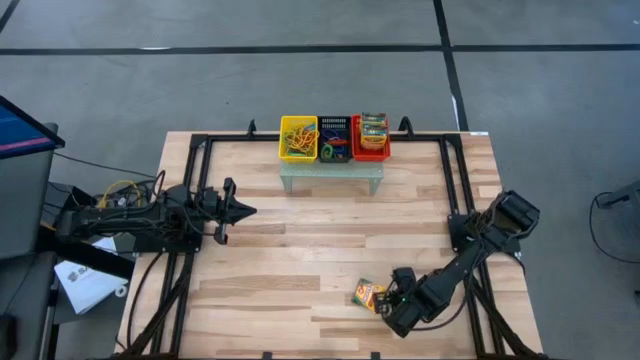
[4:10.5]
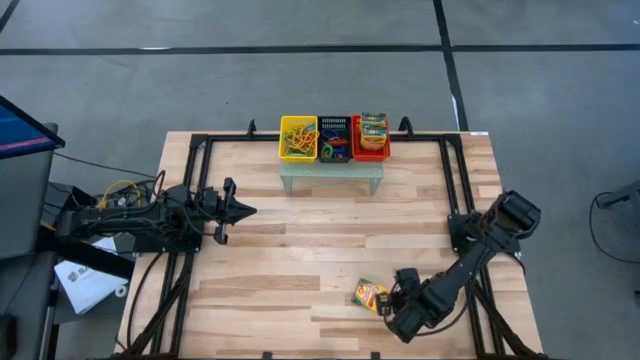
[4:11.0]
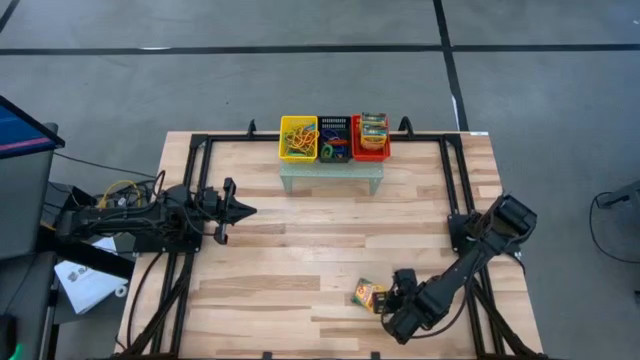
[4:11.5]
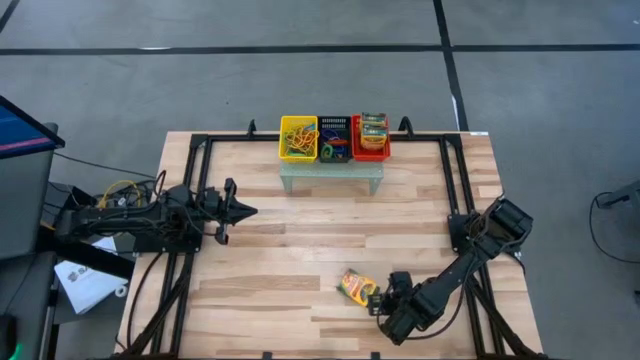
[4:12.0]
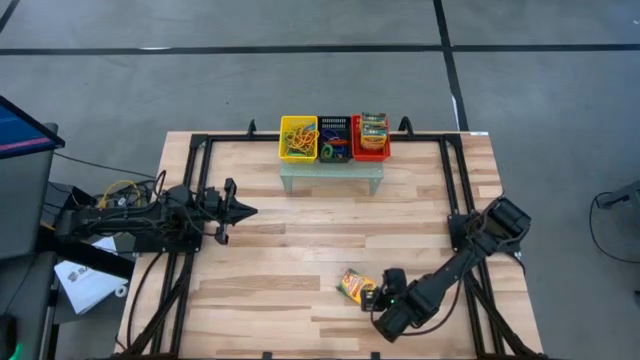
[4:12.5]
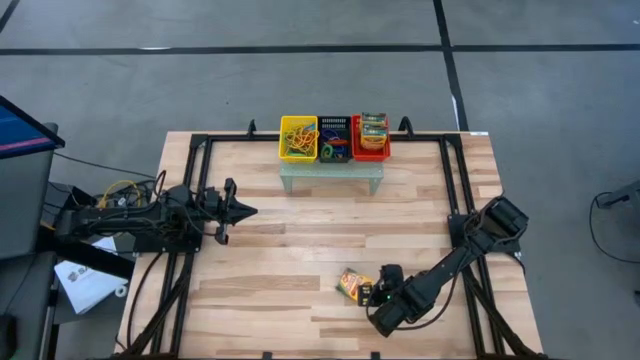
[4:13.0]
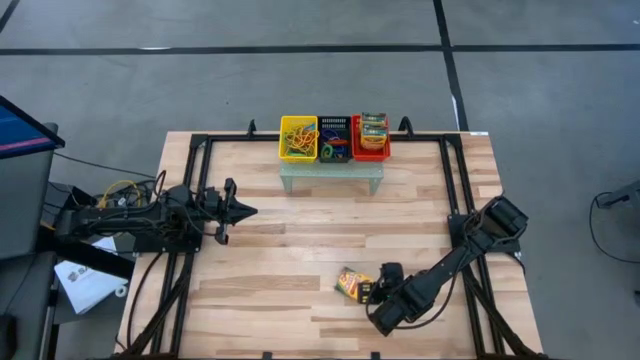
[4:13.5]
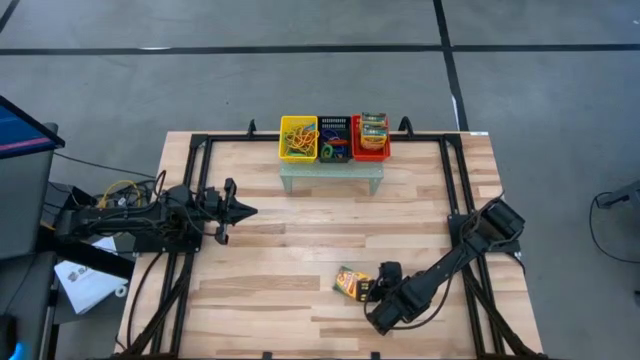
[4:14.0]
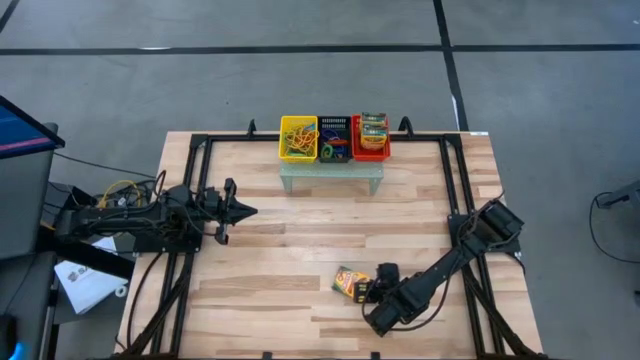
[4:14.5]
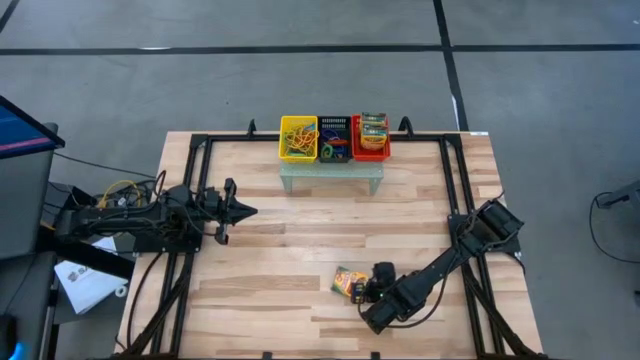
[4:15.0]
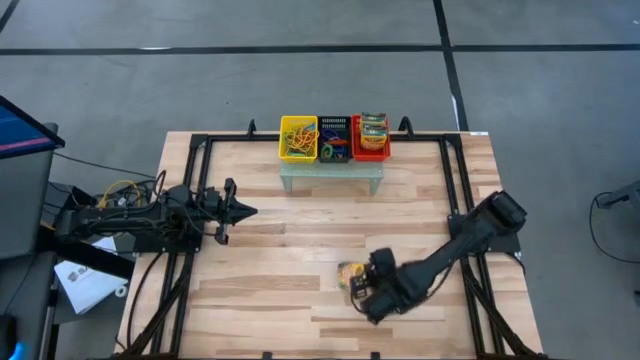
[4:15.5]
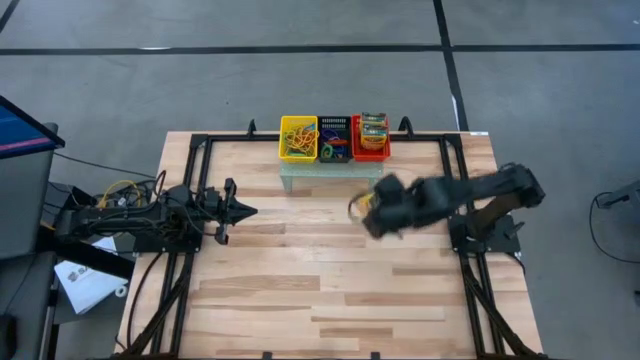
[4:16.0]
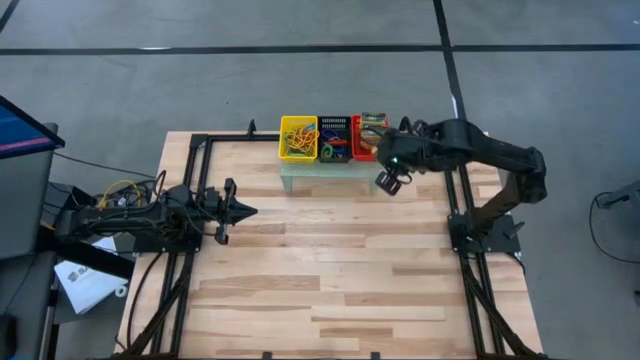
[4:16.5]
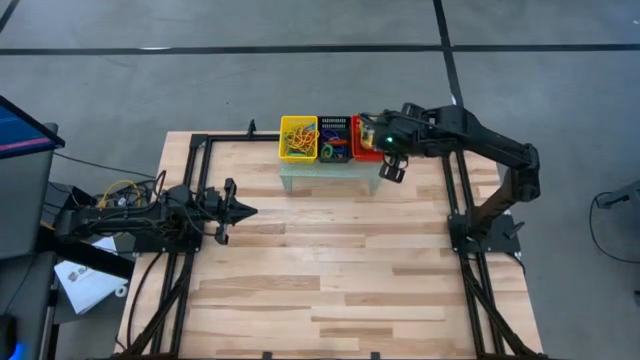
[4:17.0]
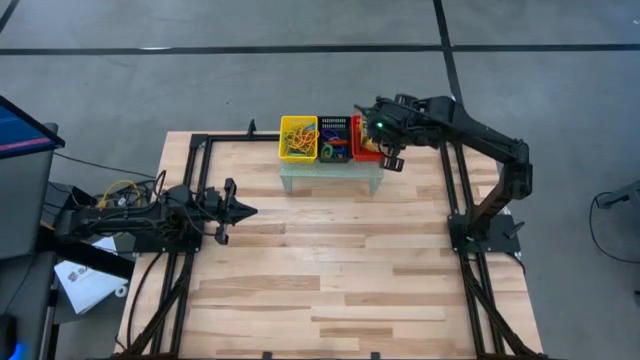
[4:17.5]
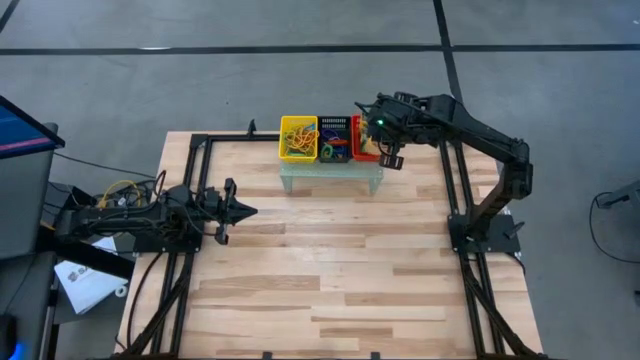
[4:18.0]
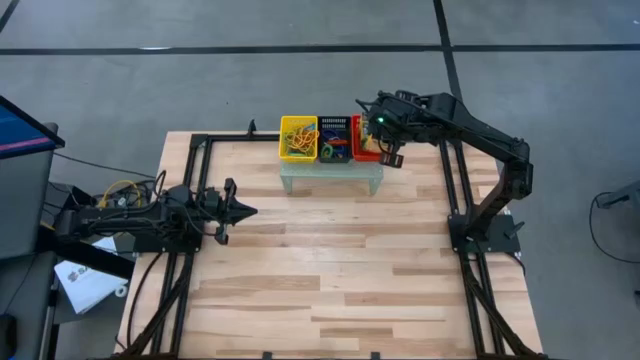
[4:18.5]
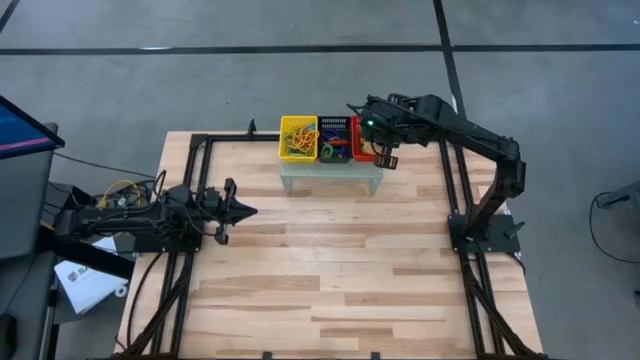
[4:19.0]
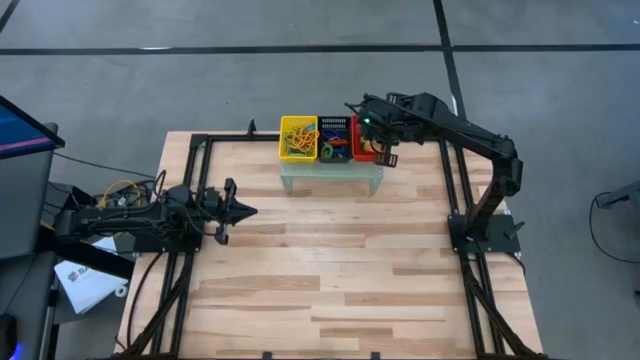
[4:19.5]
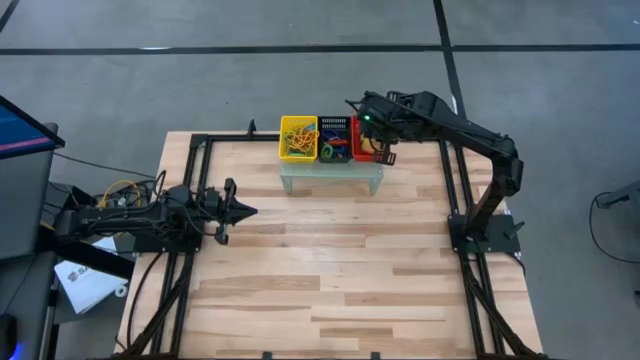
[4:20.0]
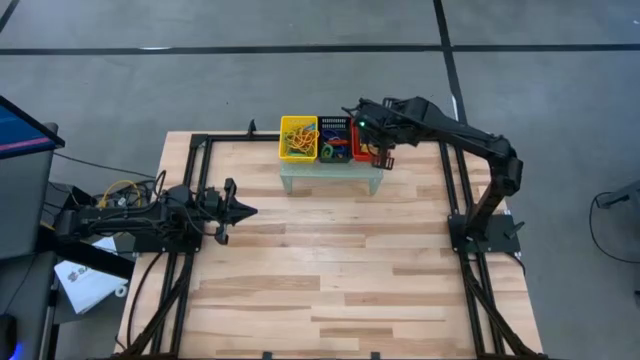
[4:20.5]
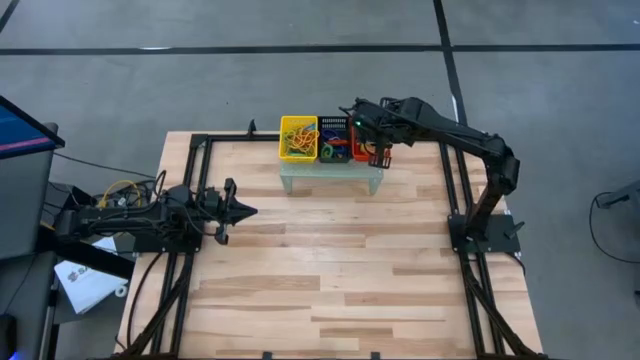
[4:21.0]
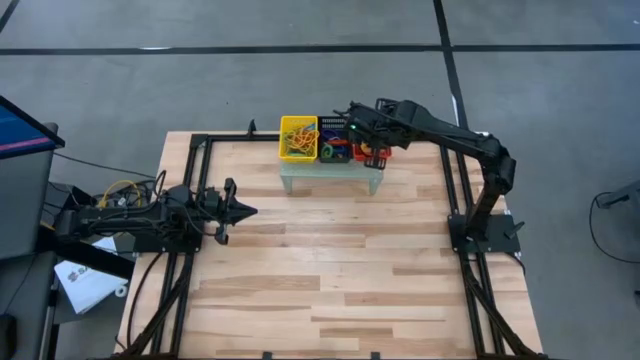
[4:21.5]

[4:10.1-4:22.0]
Task: Pick & Place Office Desk Supplies
Put the yellow crayon box into the red bin on the shelf

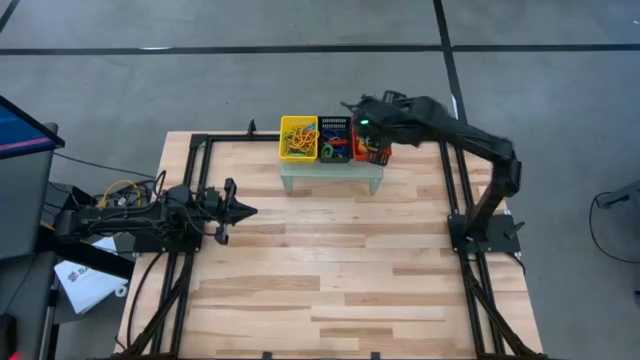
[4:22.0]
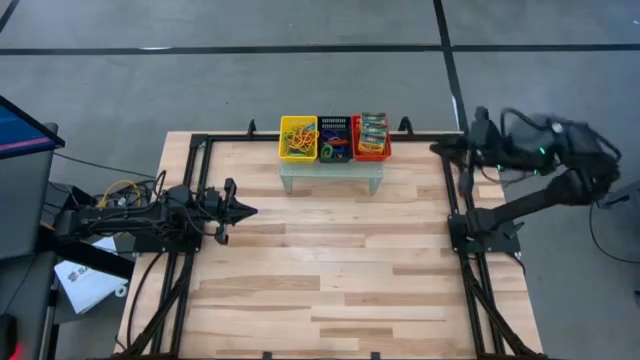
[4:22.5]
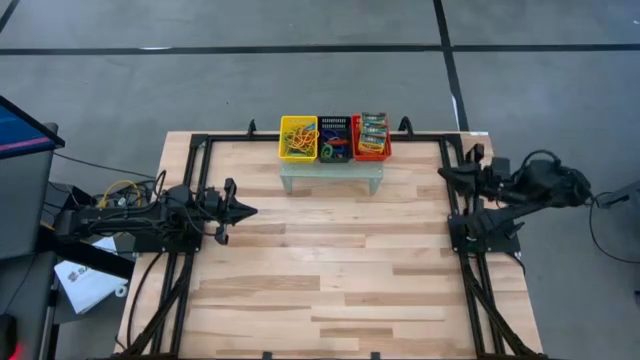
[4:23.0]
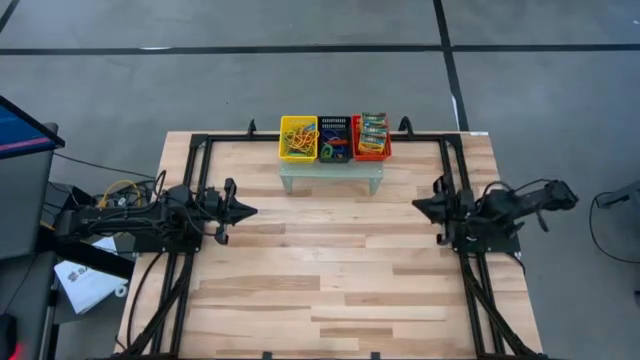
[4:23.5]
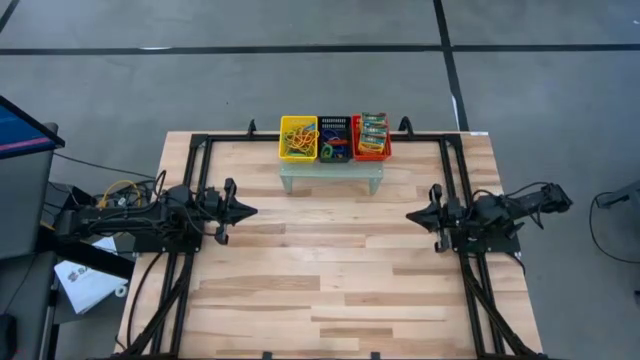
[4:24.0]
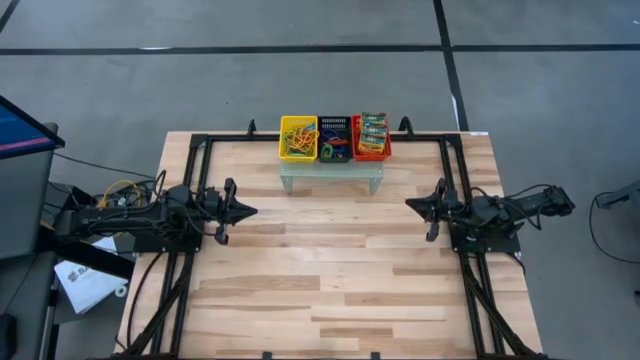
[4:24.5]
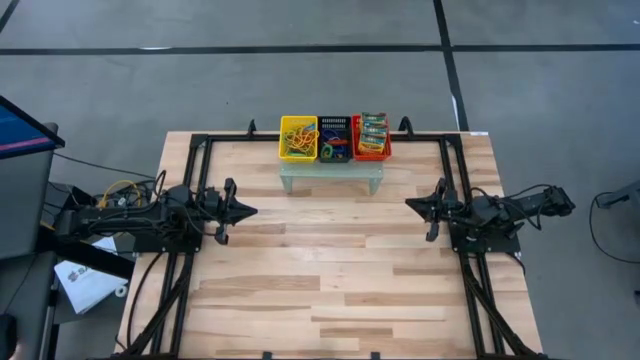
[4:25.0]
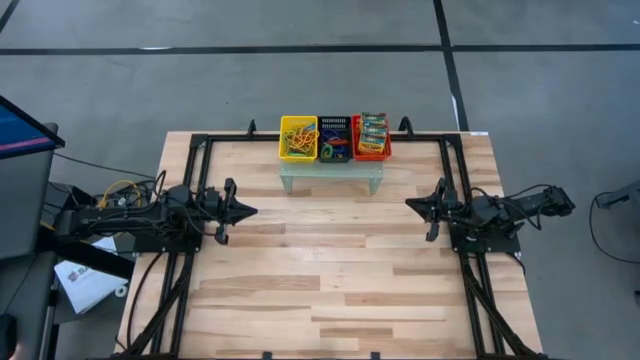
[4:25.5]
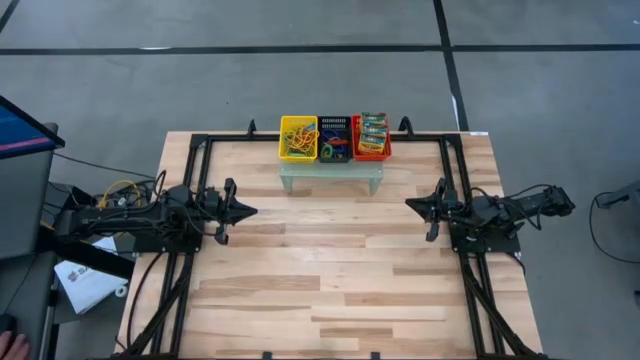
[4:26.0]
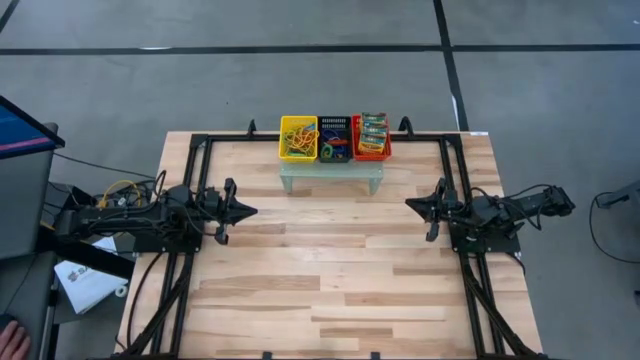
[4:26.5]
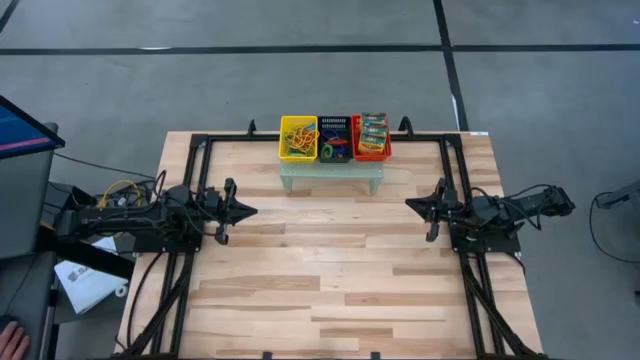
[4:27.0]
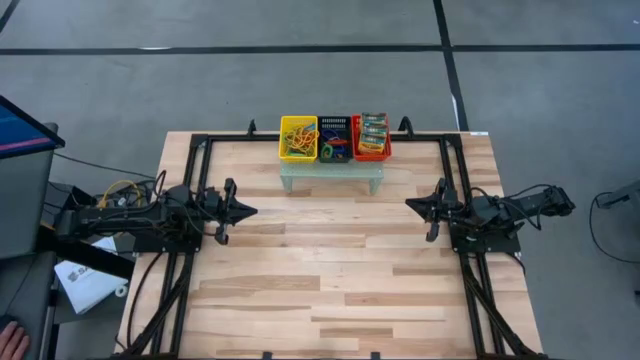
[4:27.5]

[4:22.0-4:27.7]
Return to Home Position

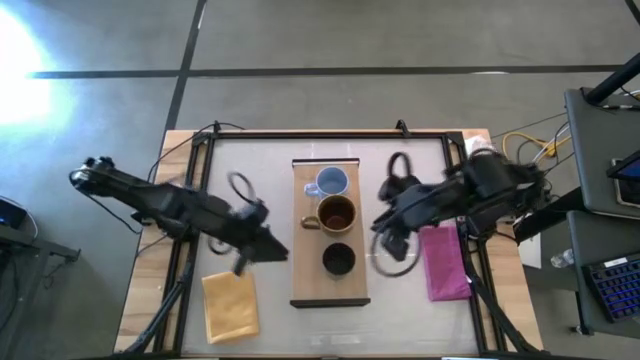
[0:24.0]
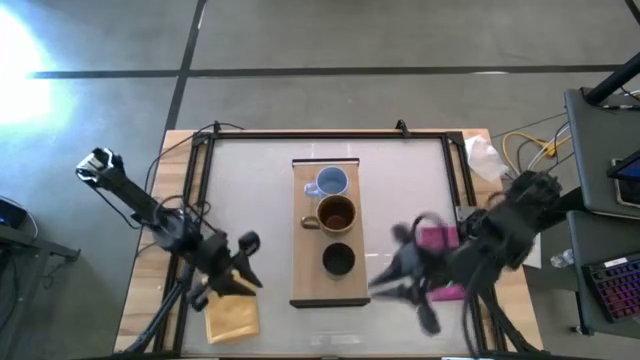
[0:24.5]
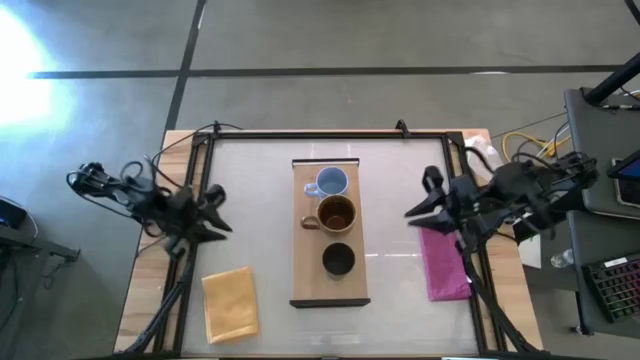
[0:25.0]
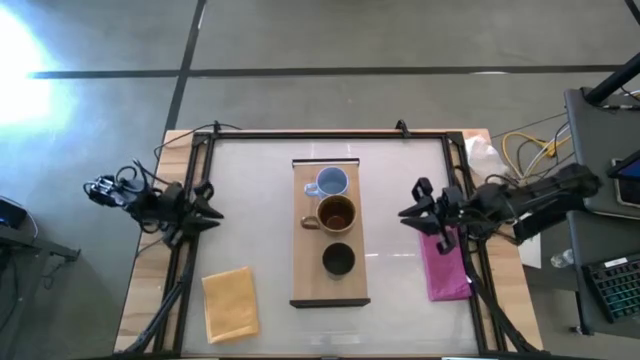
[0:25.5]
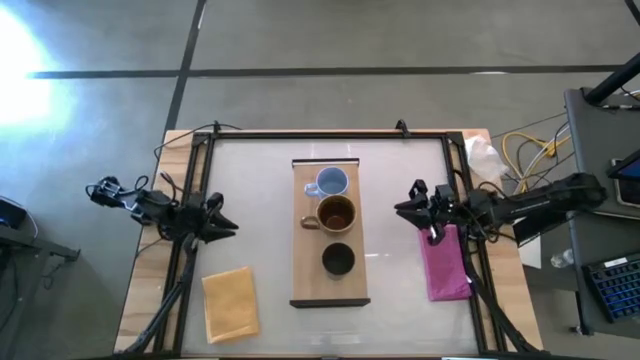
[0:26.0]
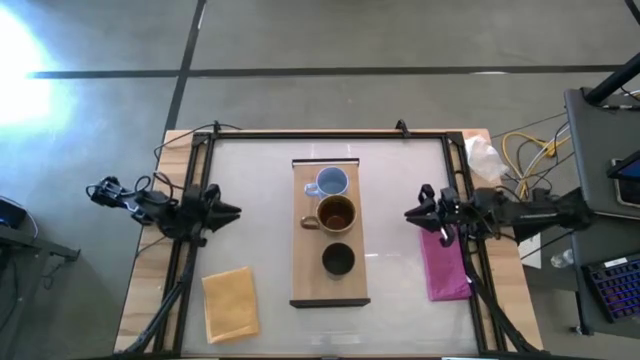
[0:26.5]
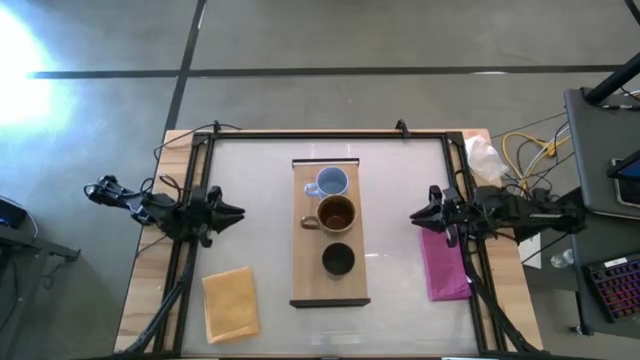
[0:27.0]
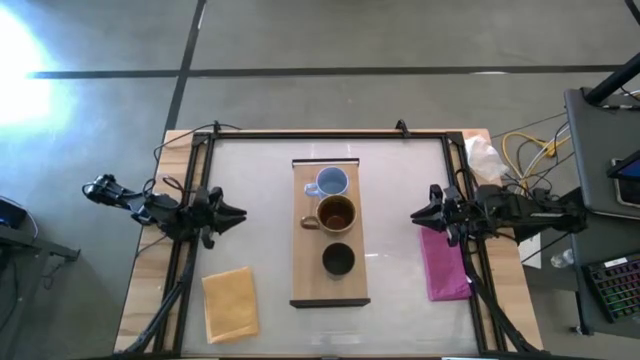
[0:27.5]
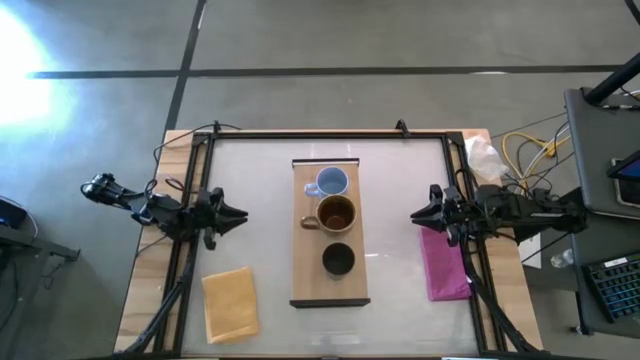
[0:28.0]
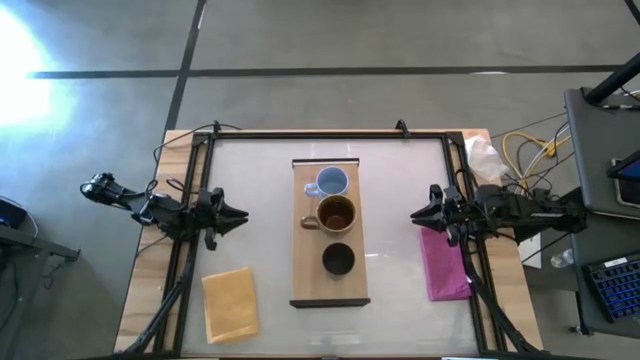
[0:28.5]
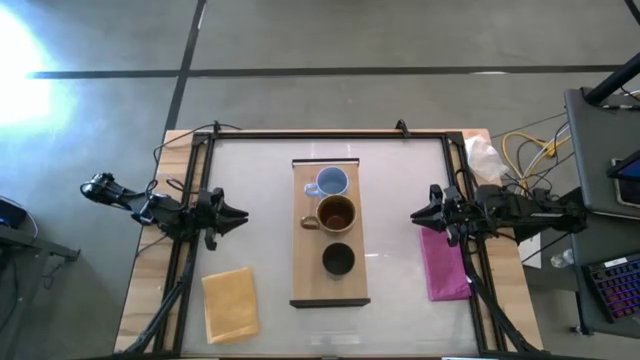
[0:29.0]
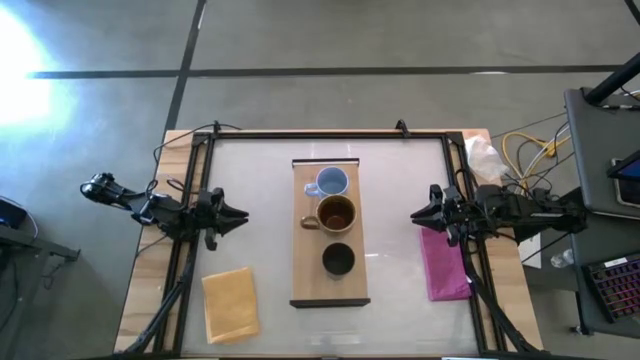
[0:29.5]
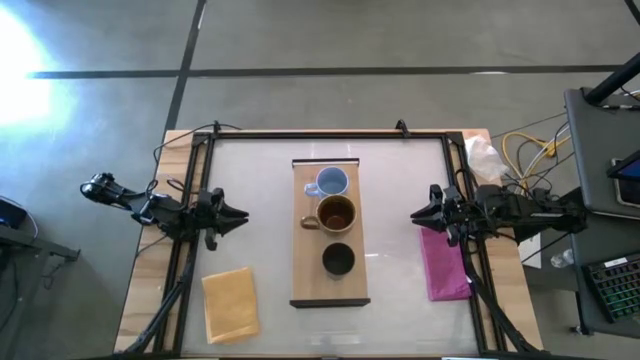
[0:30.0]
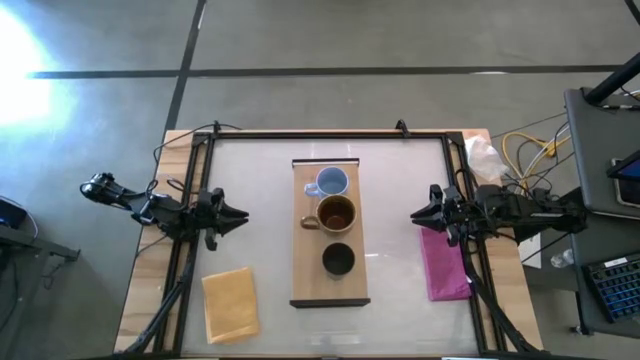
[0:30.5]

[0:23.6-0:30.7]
Task: Stack small to large cups/mugs on shelf
Return to Home Position
